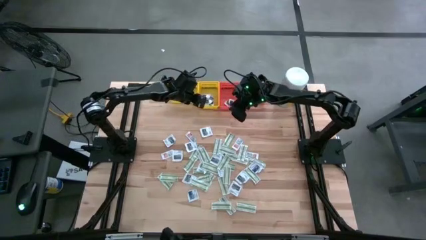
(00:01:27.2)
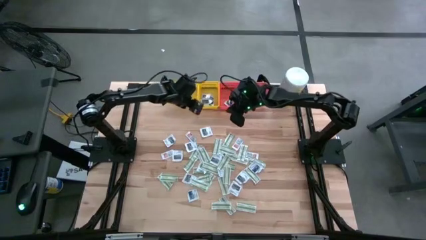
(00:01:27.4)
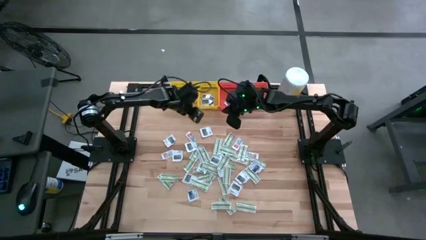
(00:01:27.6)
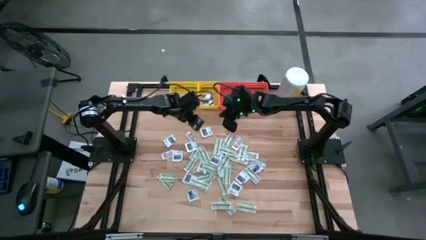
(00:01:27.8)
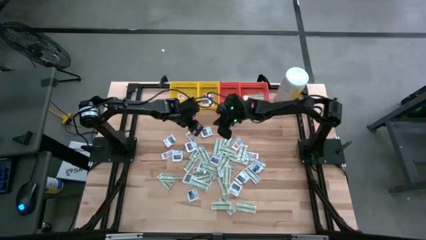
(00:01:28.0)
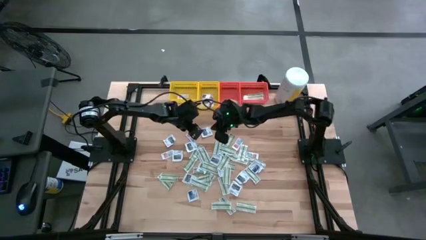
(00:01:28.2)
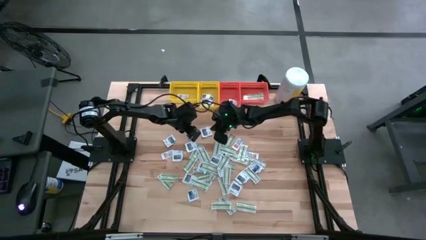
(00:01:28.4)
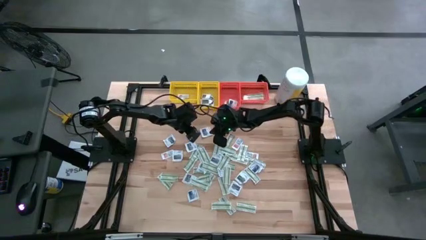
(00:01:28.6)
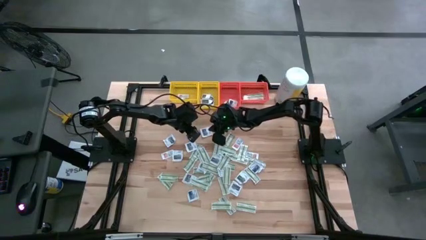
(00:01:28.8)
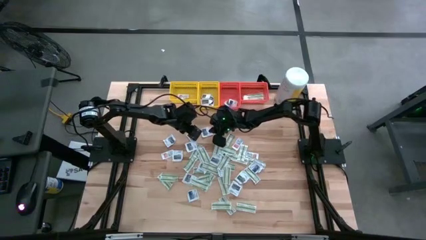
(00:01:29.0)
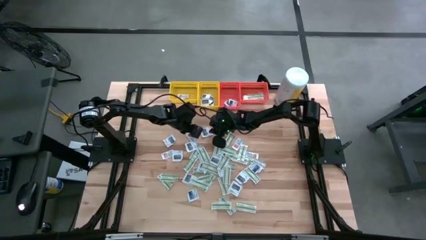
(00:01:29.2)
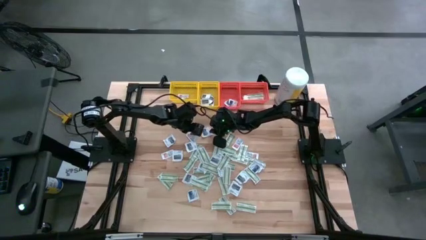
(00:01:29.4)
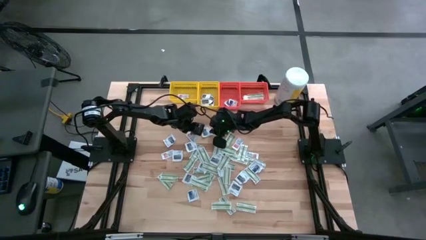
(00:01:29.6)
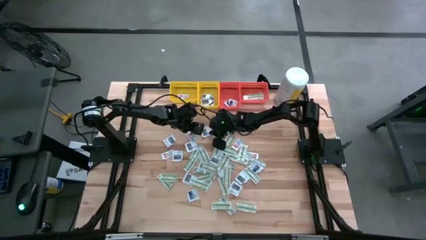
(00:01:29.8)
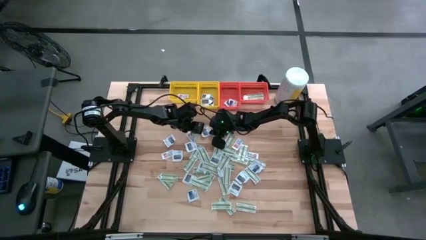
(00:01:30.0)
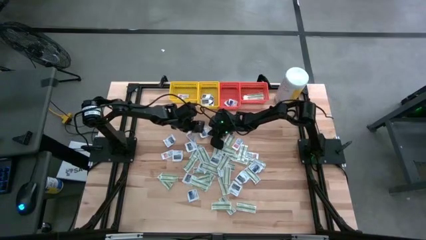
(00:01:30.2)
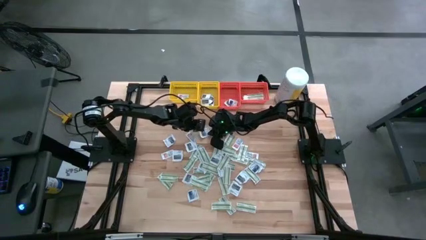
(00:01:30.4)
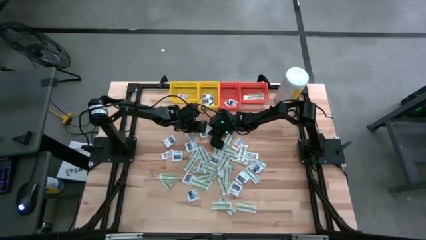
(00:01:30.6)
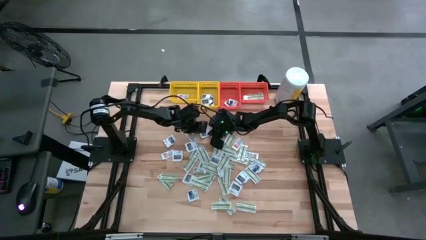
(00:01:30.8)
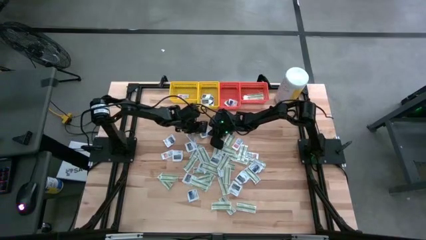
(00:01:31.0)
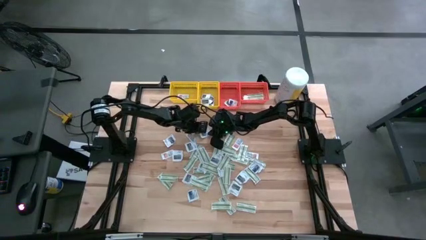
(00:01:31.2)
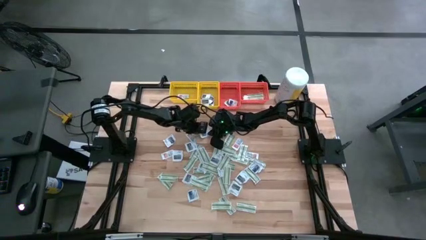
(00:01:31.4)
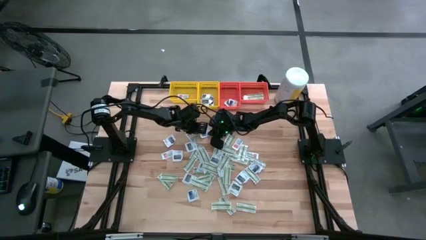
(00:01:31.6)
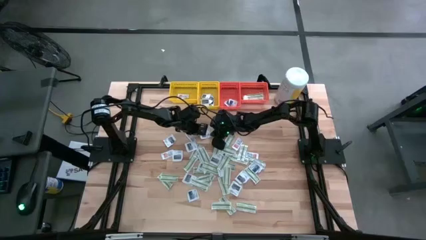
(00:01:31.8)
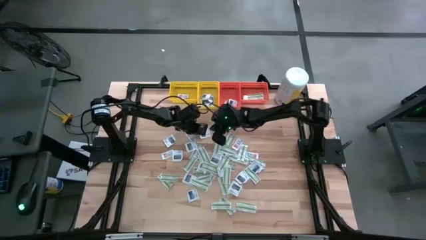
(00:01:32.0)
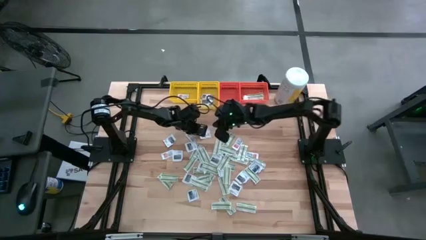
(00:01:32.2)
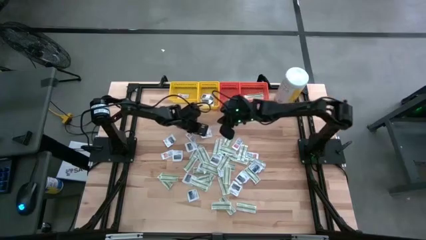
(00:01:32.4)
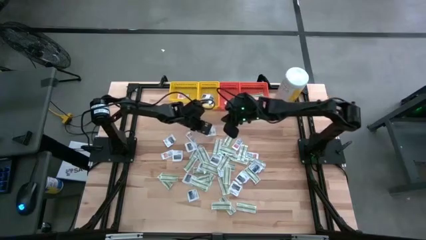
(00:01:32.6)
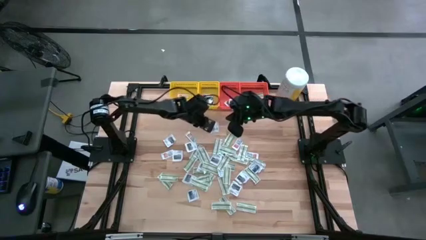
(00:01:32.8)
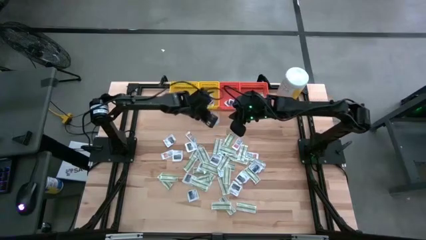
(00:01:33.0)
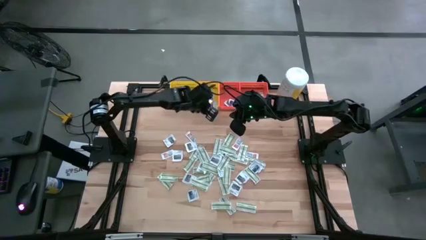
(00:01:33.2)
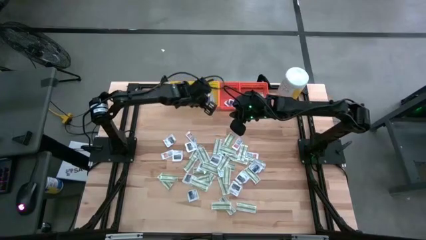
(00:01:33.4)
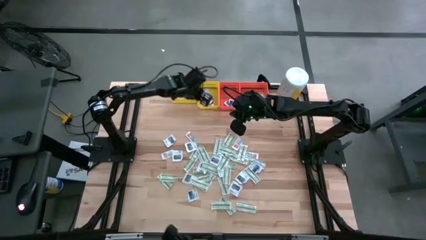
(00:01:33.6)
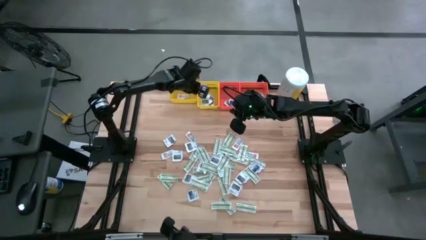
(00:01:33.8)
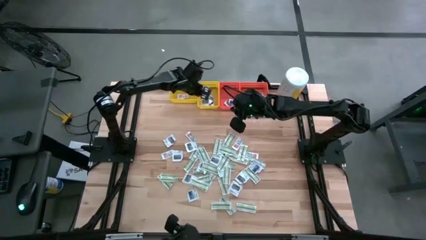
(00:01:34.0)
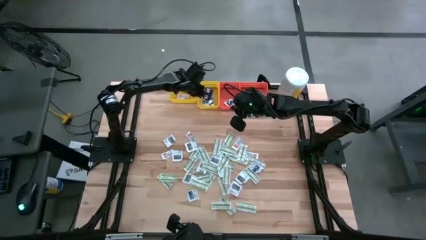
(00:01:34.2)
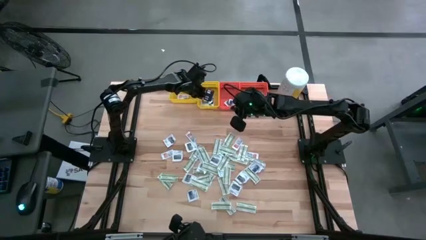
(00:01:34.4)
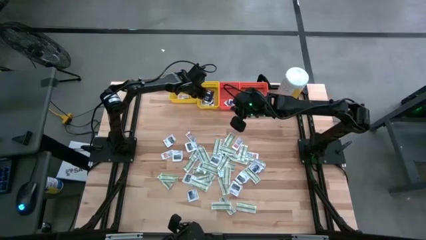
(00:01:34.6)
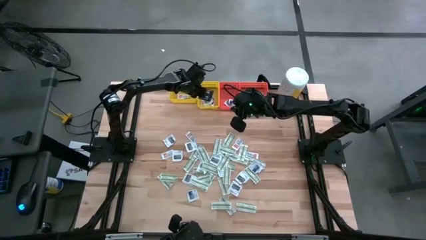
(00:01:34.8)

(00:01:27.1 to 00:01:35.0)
Task: Pick & Place First Aid Supplies
Put the gray packet into the right yellow bin

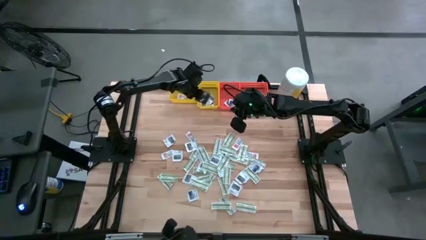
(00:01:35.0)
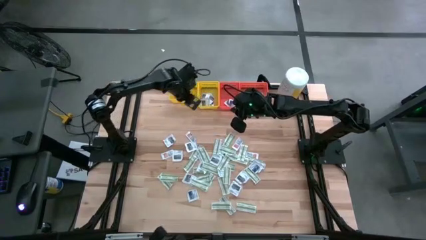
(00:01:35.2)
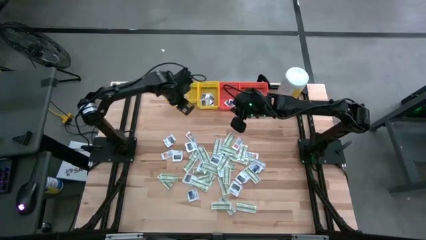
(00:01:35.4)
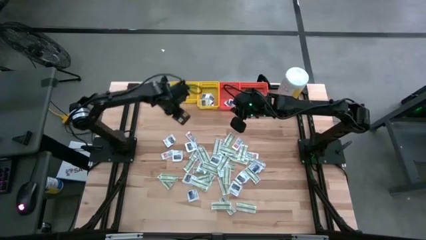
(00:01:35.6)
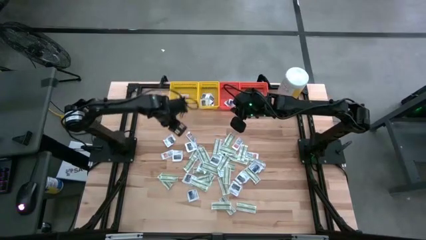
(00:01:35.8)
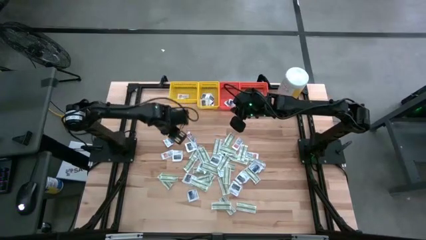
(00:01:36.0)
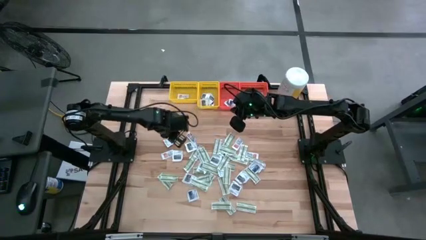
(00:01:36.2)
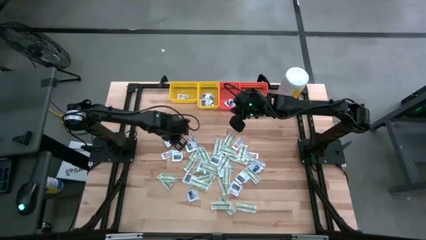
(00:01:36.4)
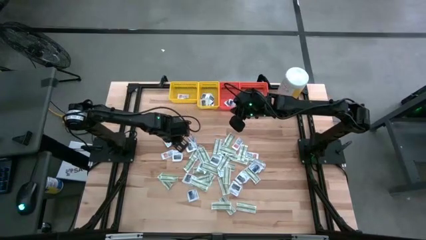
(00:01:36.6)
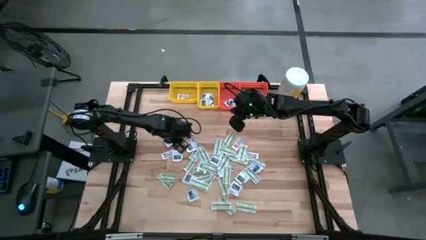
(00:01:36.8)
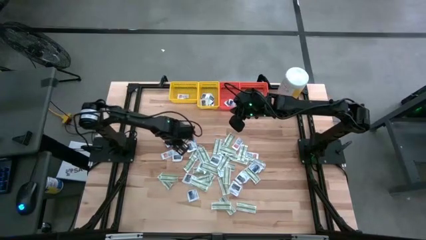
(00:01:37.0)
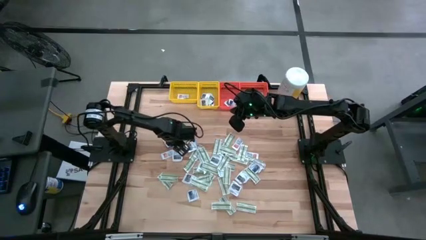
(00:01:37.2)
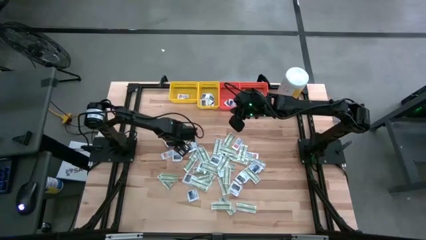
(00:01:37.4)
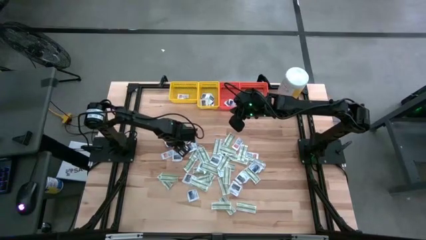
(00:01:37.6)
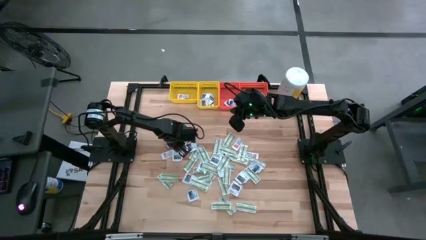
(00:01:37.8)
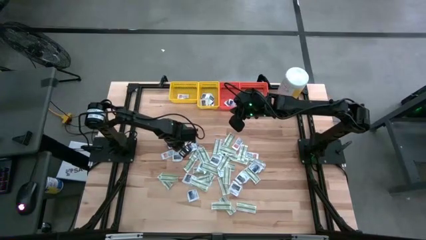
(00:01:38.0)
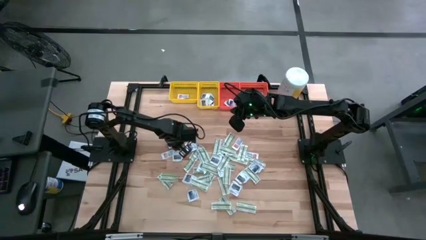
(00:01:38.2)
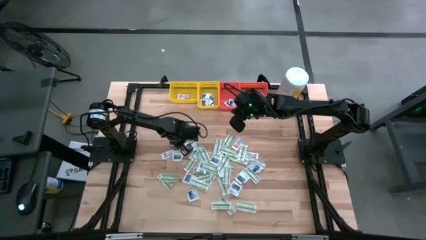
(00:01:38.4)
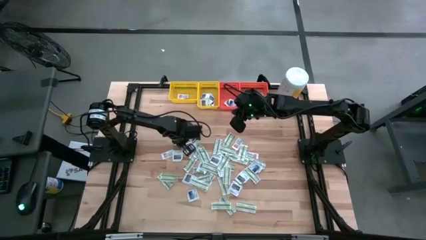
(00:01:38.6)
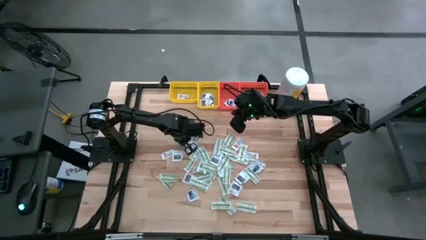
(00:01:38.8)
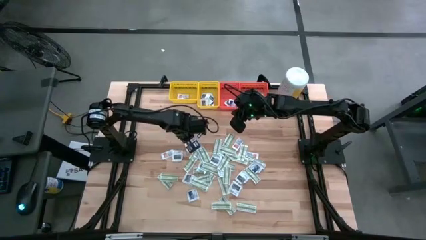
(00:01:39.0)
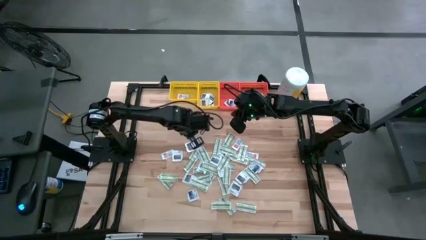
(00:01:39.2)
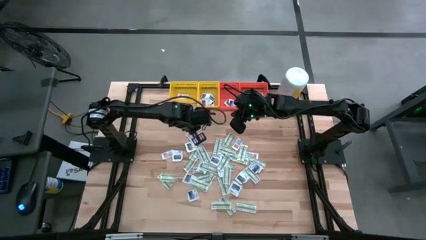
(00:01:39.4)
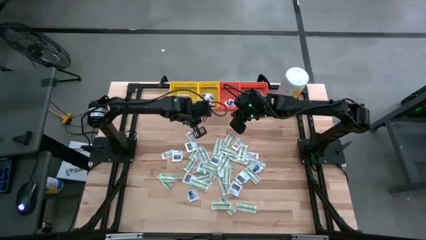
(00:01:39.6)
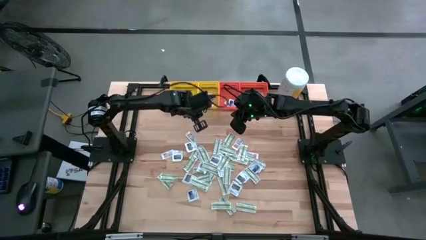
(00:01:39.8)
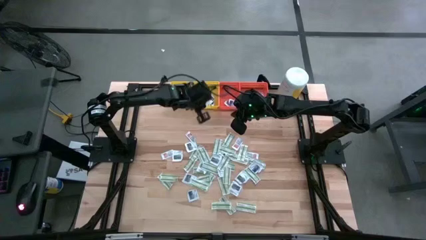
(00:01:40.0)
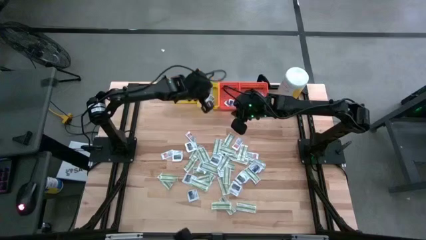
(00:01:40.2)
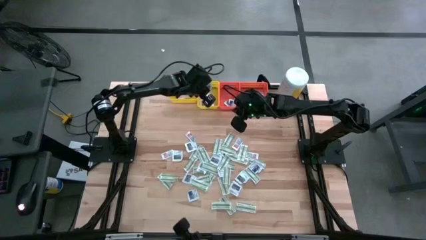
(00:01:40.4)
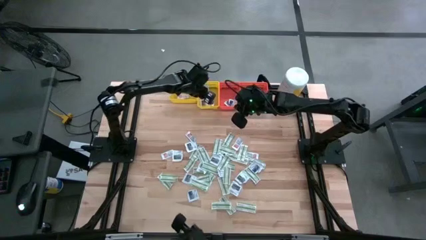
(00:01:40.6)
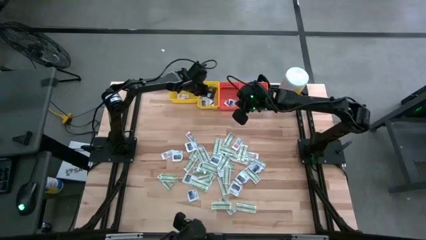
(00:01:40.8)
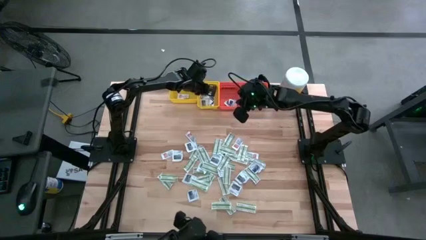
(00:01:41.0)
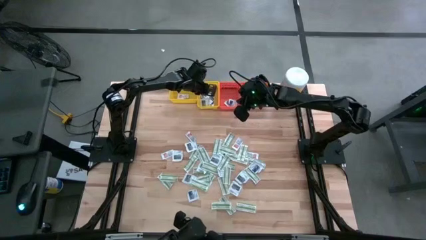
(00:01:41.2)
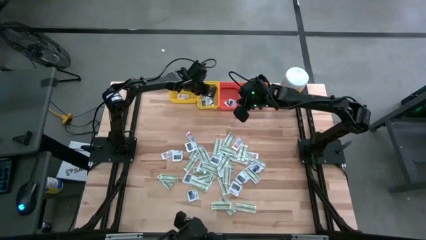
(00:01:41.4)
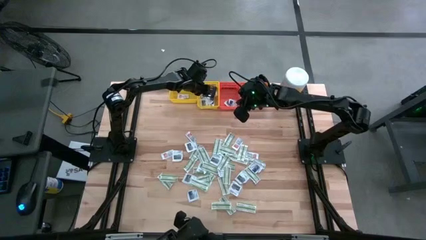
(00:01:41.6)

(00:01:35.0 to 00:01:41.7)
Put the gray packet into the right yellow bin

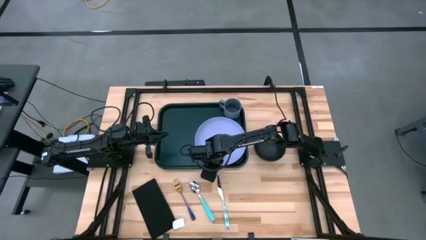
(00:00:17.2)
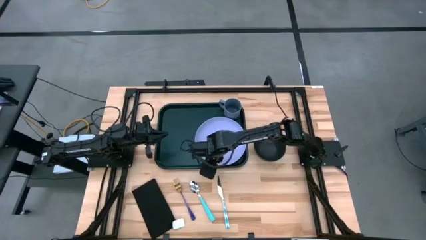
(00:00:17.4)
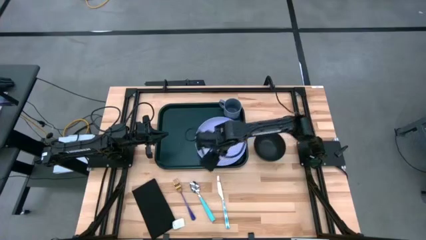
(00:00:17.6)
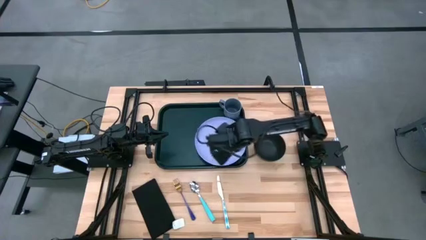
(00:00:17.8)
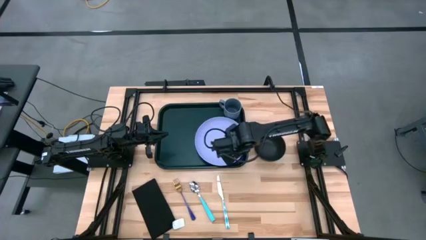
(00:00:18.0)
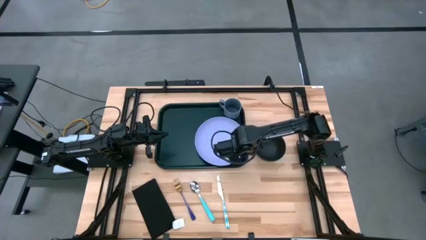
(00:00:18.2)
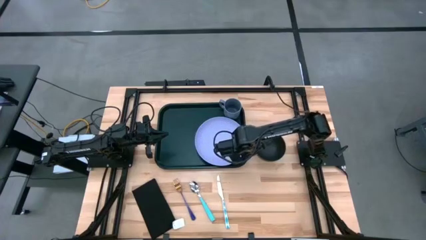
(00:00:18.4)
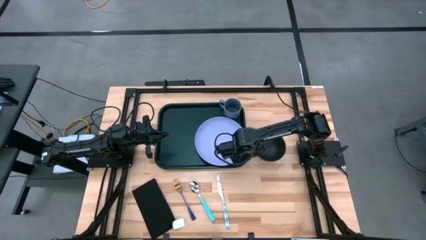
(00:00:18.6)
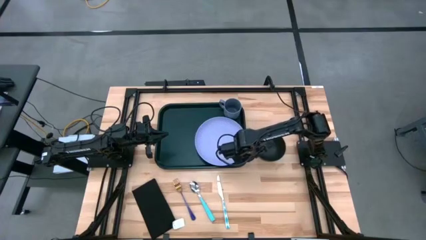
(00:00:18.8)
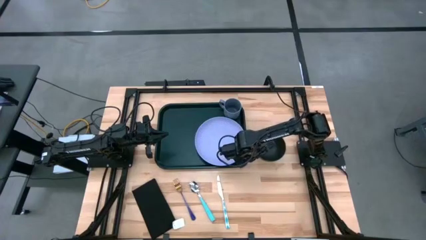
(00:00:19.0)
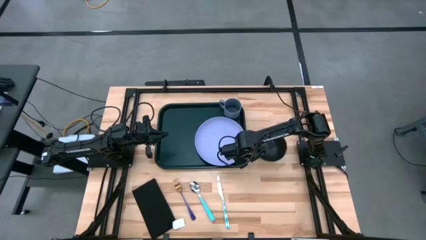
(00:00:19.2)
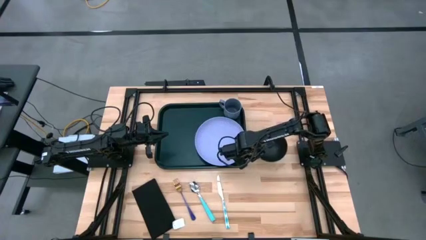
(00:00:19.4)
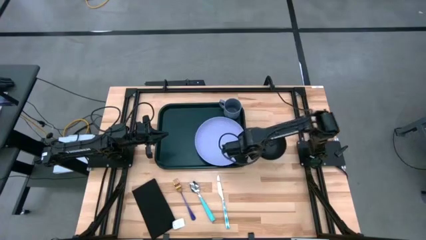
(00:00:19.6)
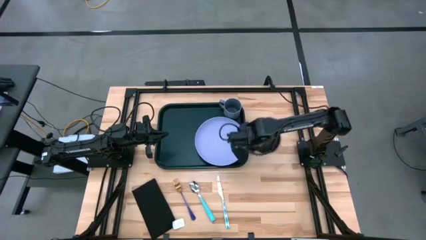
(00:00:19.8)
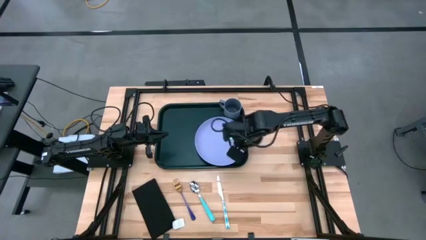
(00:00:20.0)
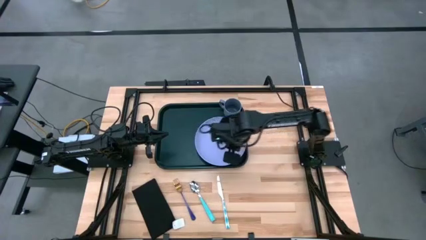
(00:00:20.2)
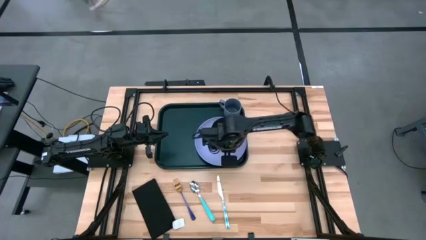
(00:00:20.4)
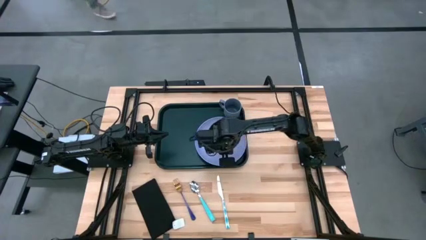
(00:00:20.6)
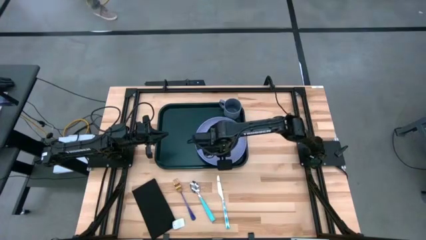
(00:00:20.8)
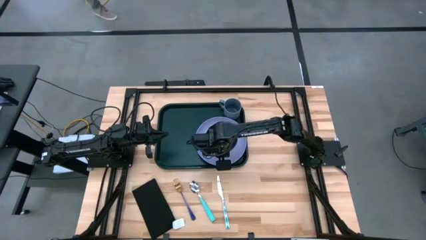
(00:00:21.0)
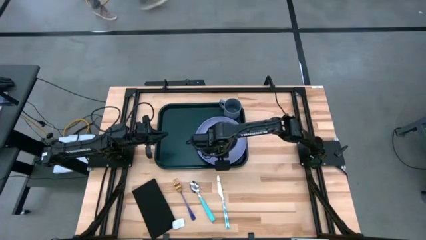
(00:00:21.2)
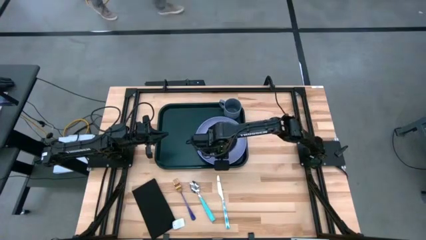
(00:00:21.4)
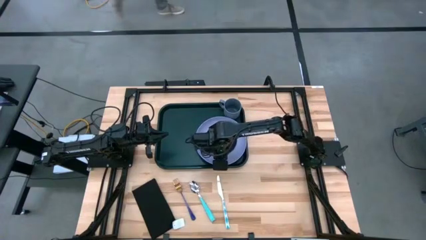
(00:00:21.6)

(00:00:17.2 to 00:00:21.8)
Task: Set up tray
Put the black bowl on top of the purple plate
